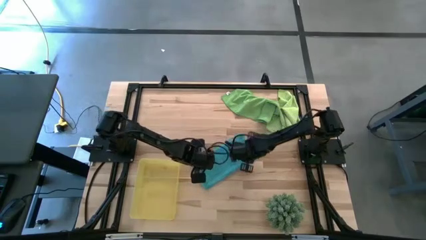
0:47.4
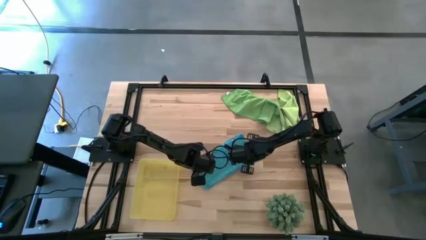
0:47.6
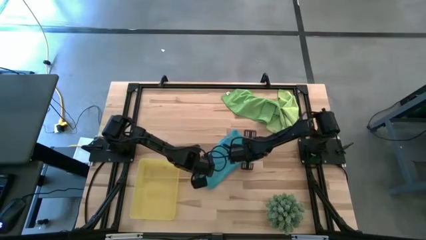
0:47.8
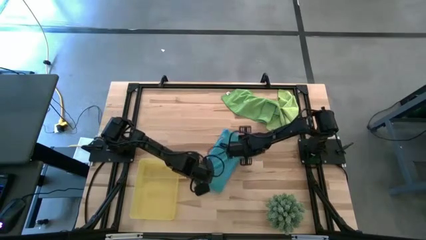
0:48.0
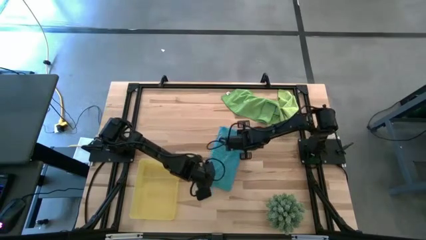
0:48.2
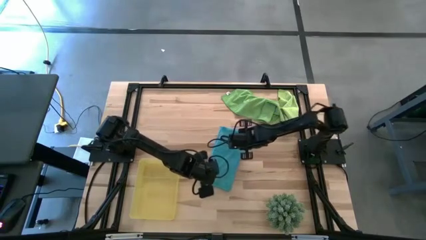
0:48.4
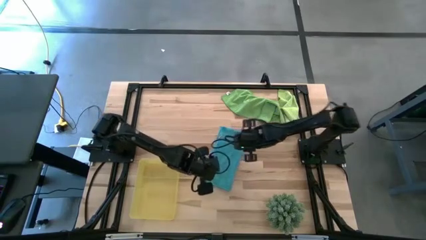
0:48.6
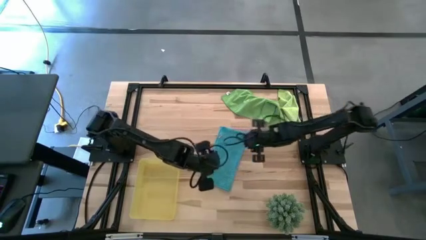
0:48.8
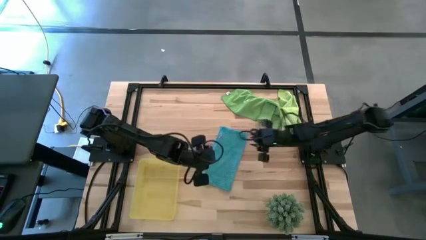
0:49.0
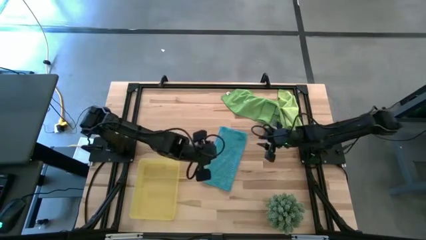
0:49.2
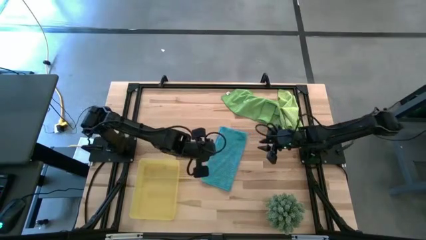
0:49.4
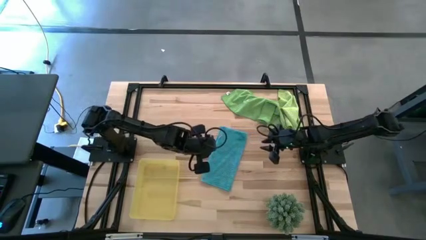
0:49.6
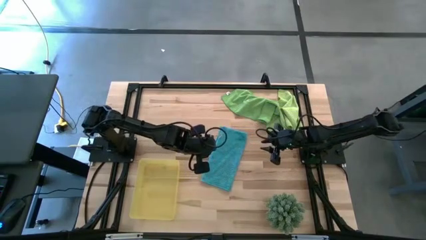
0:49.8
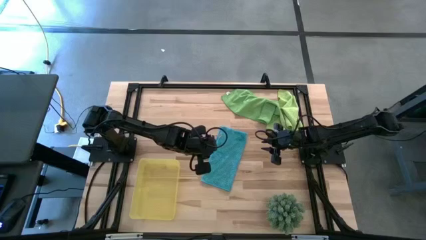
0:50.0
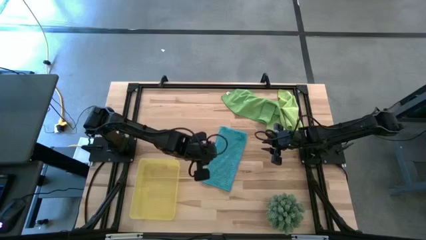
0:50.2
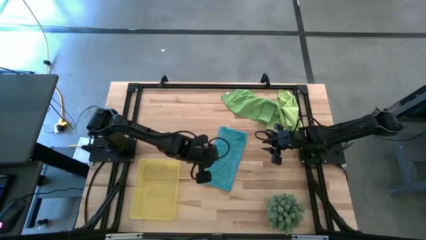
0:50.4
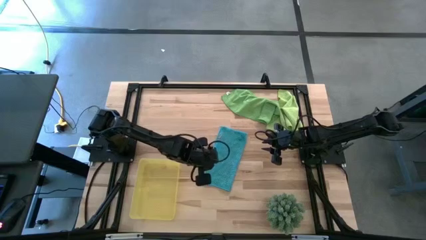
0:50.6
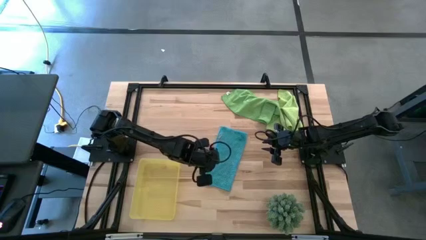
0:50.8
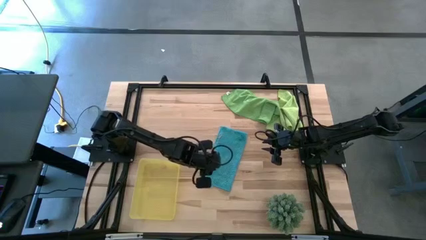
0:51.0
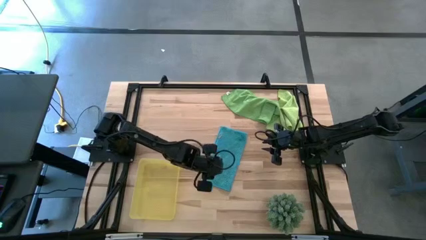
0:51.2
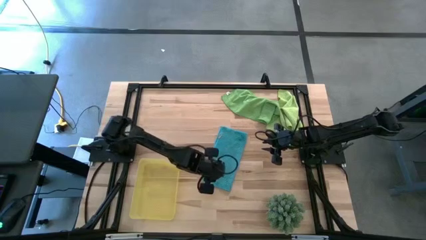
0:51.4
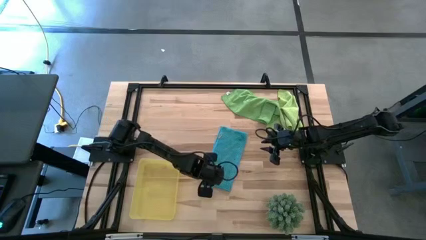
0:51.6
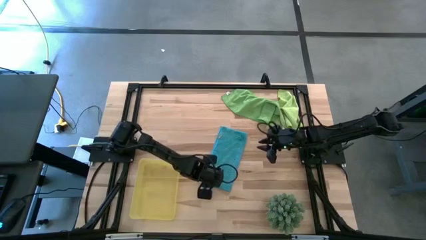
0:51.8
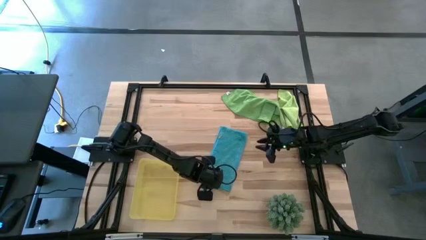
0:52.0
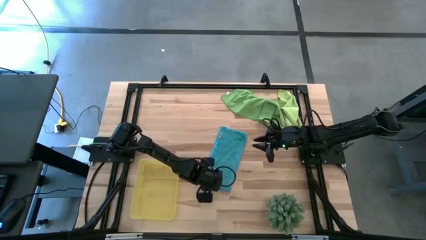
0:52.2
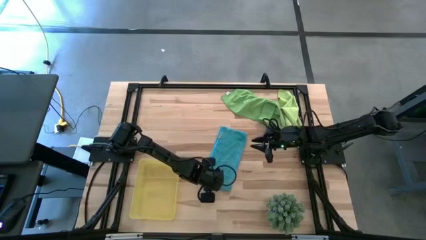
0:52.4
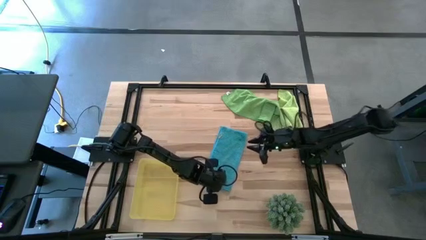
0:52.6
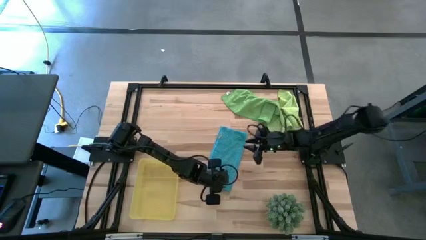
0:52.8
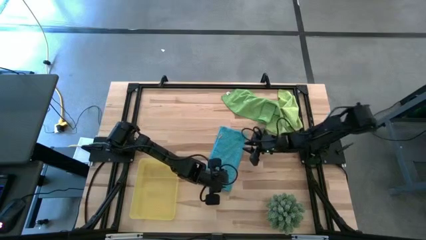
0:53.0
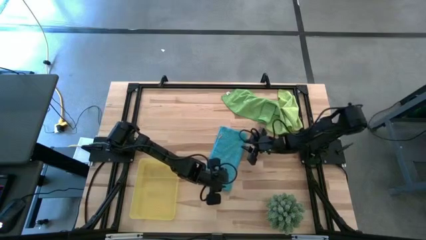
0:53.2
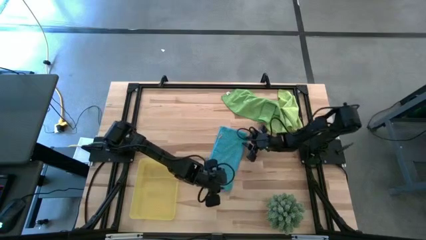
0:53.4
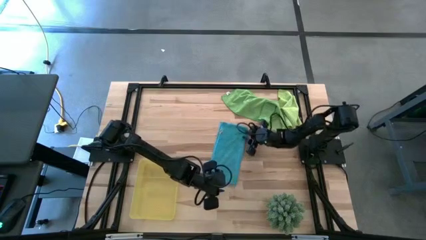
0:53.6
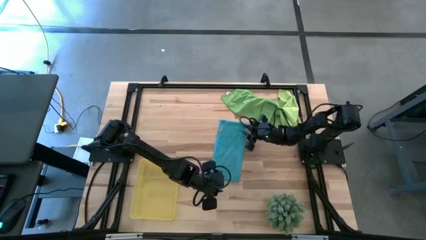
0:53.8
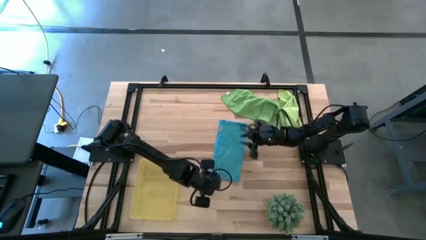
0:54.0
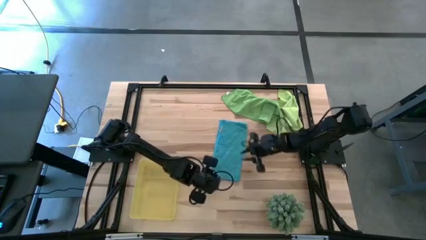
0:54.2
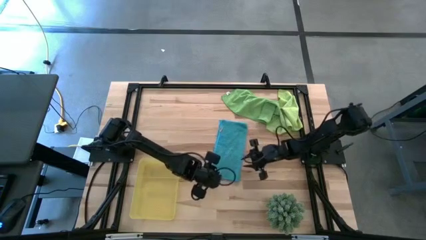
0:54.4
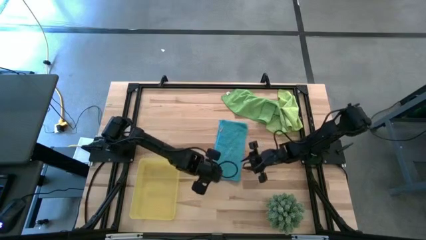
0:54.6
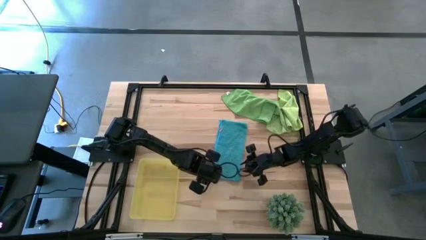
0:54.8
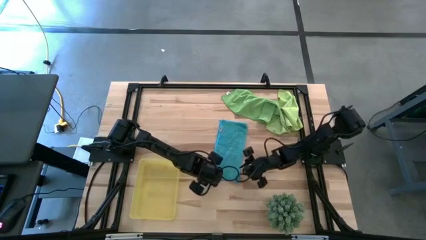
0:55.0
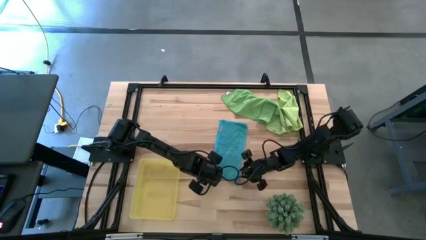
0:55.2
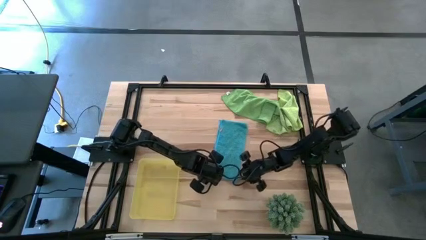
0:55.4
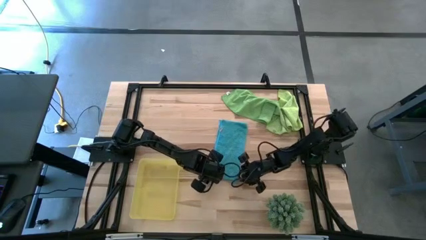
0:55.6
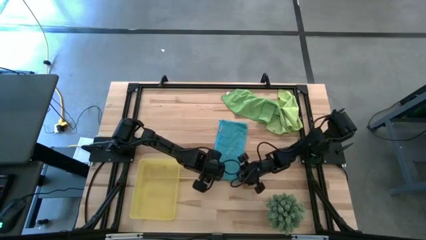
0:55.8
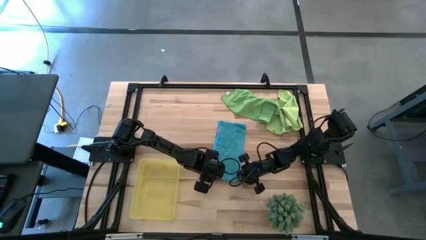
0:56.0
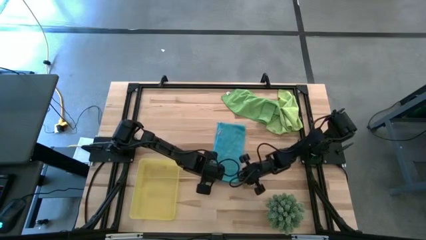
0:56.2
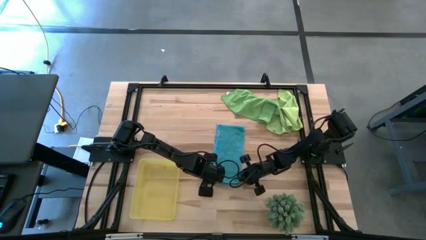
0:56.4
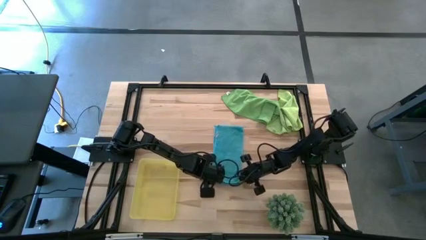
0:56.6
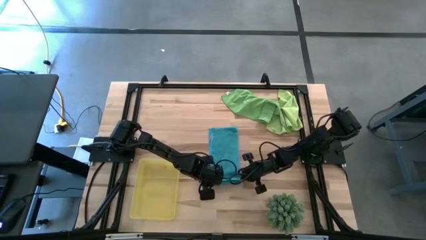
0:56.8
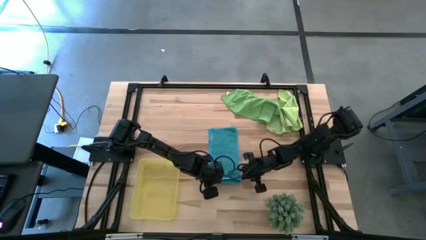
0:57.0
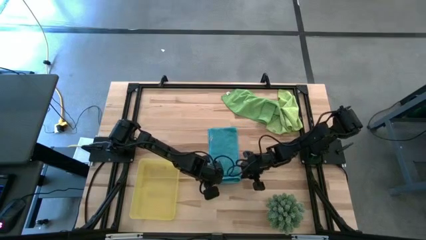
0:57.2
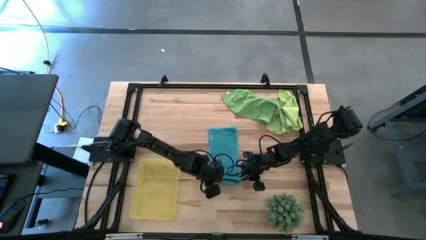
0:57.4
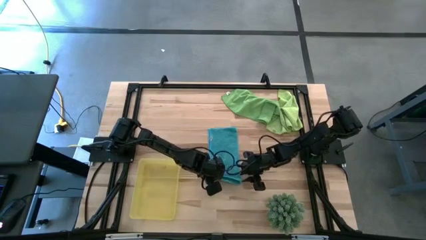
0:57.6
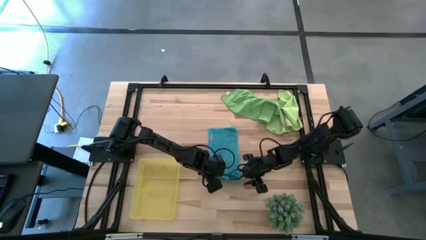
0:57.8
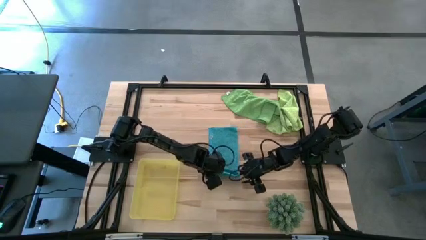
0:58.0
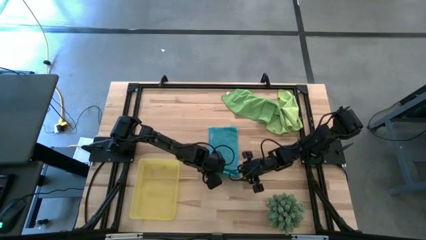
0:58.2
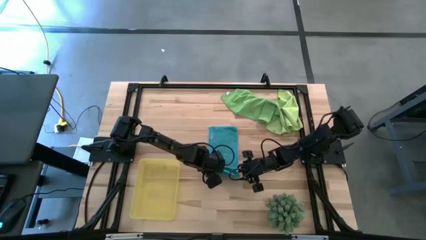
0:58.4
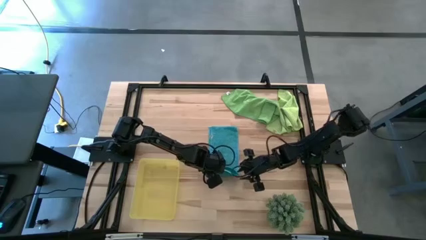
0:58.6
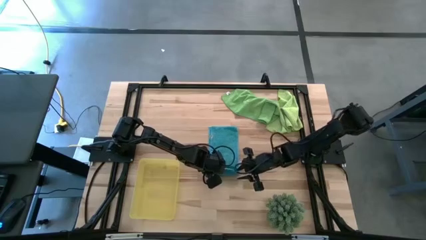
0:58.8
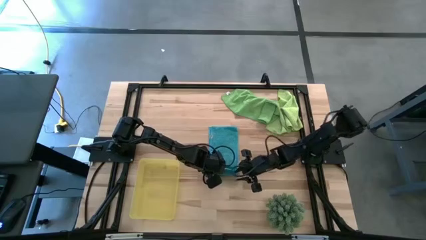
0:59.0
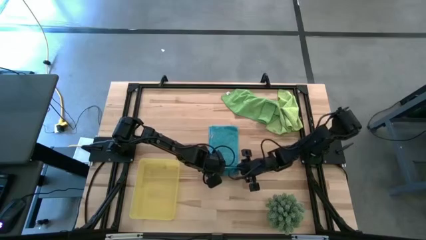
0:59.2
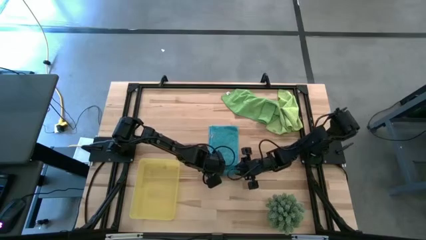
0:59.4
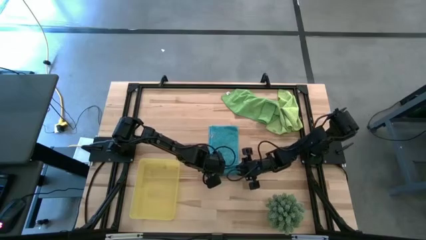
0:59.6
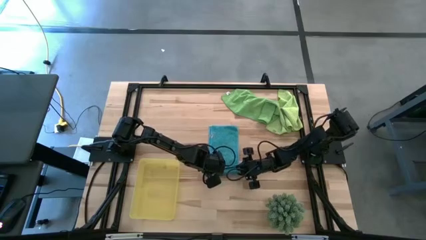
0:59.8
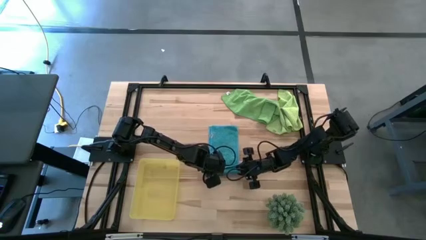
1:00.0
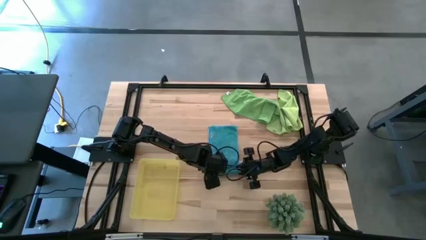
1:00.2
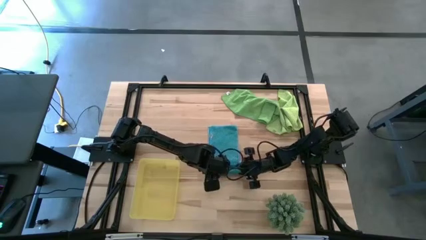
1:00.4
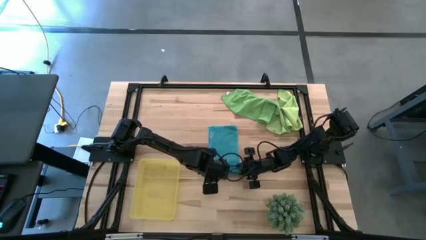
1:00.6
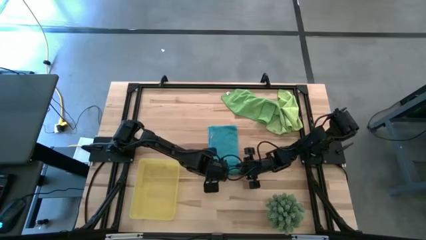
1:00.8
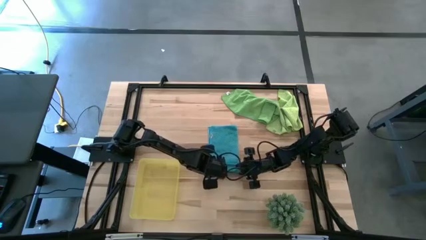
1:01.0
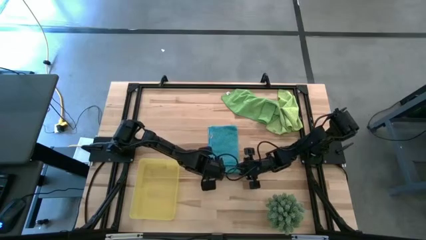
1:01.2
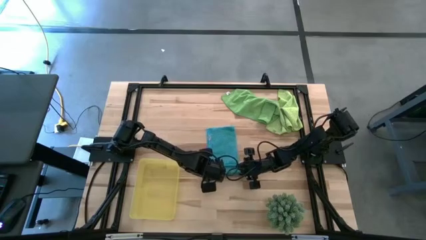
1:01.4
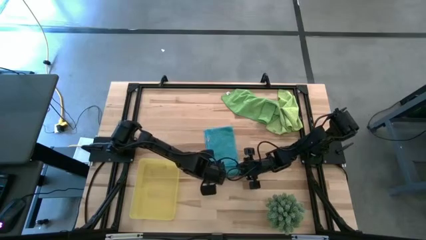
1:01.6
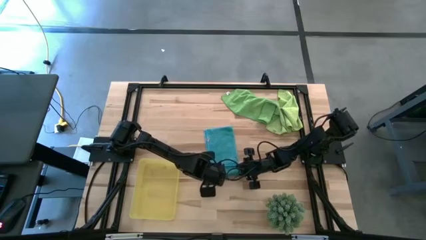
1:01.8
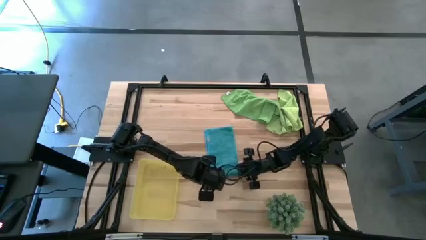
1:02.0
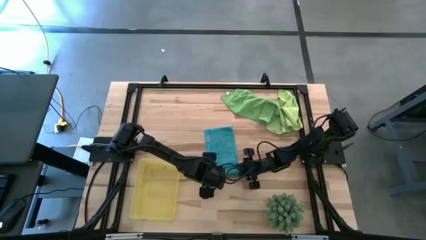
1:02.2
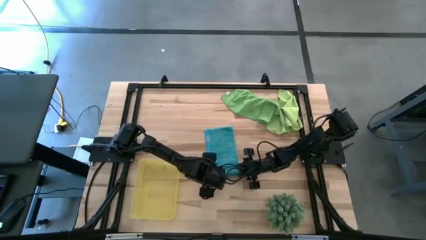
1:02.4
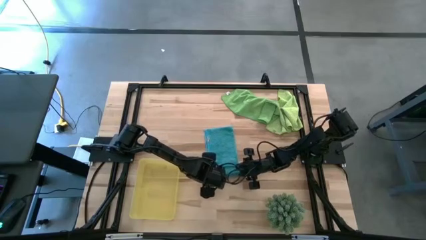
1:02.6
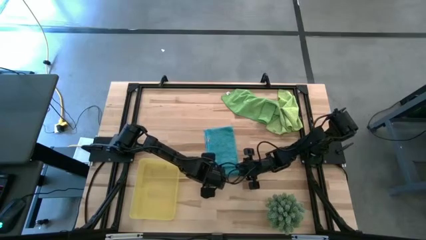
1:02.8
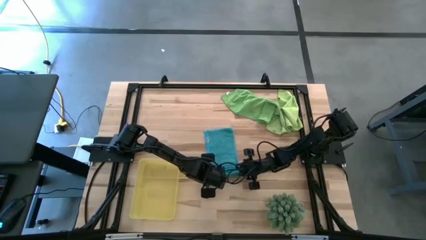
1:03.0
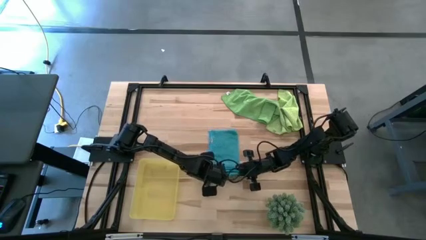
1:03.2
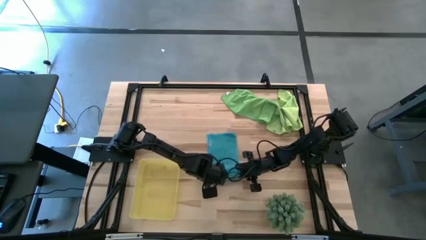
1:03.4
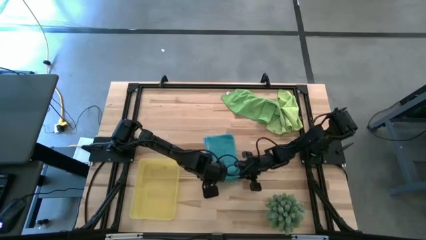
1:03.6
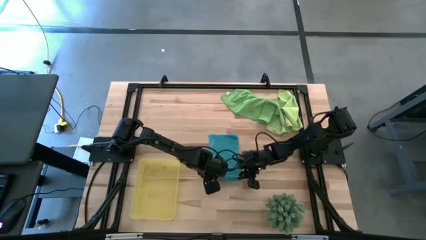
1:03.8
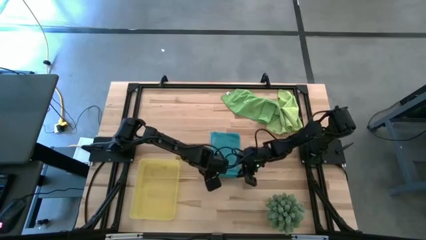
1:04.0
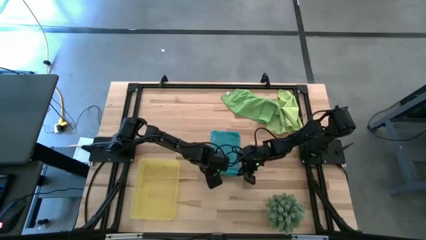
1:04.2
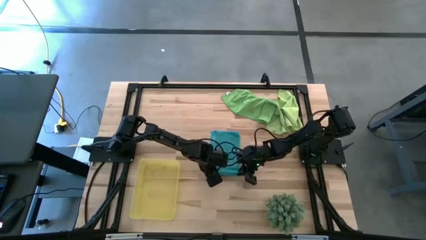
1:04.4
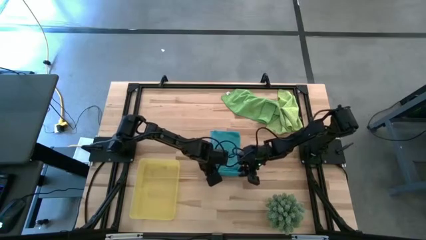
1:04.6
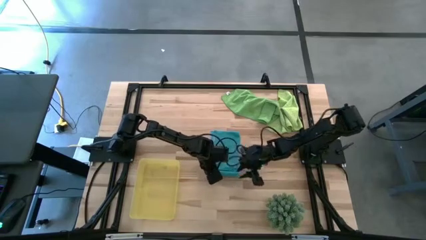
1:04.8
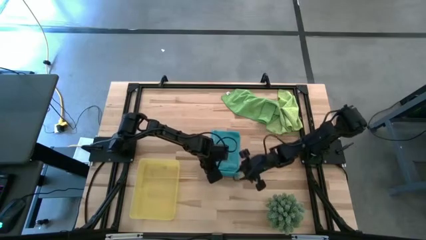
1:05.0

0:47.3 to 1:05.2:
Task: Roll microfiber towels into tight, uniform cylinder then place into a basket
Roll the blue microfiber towel
